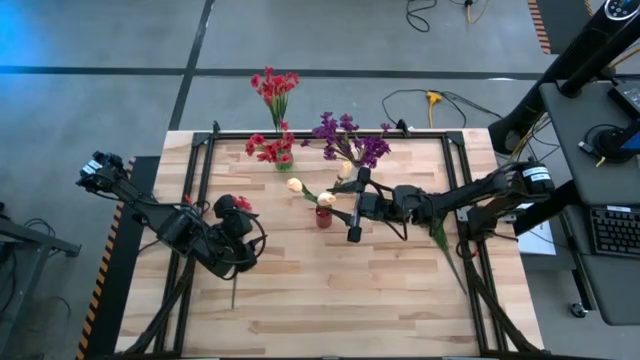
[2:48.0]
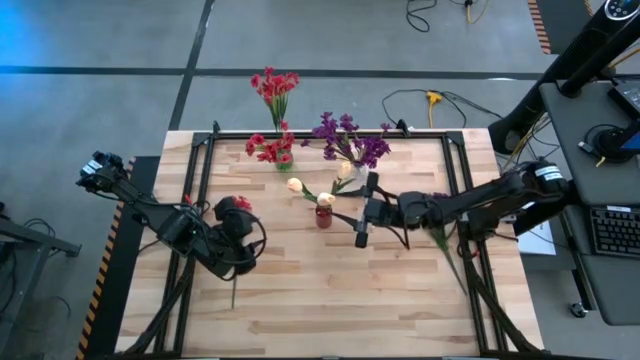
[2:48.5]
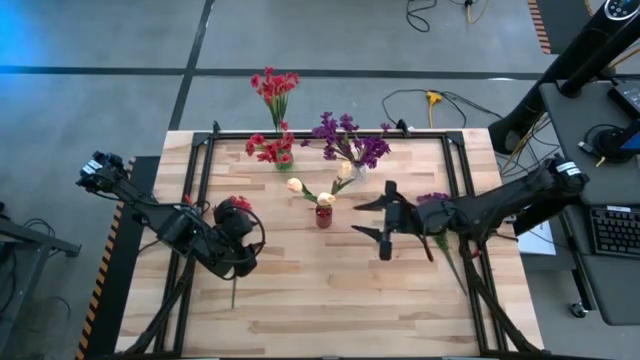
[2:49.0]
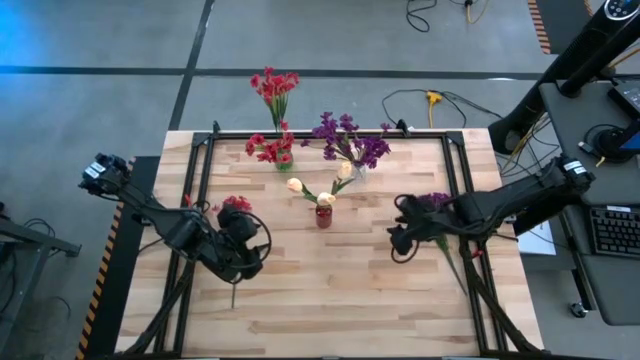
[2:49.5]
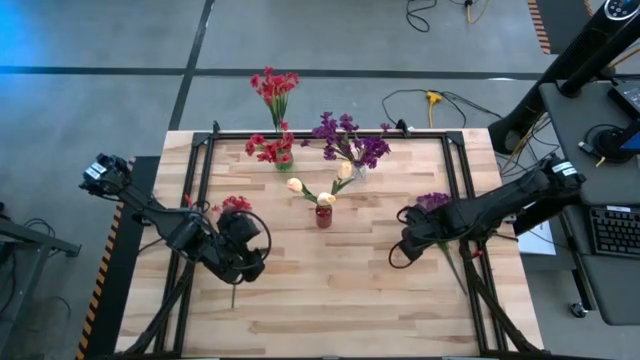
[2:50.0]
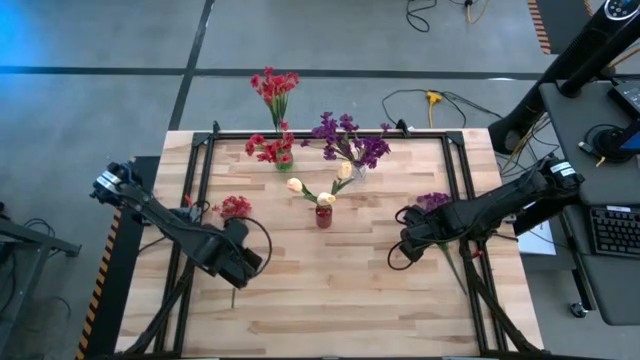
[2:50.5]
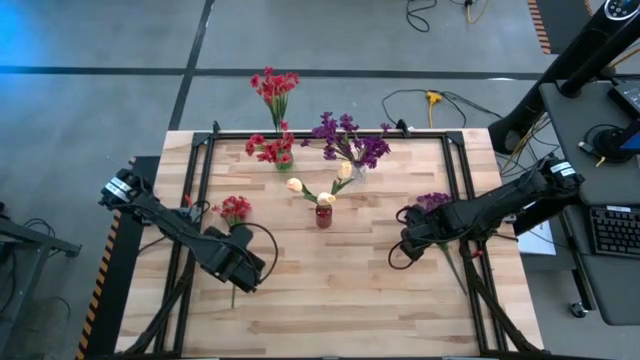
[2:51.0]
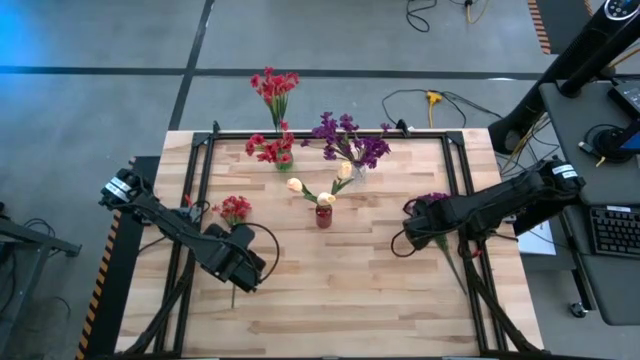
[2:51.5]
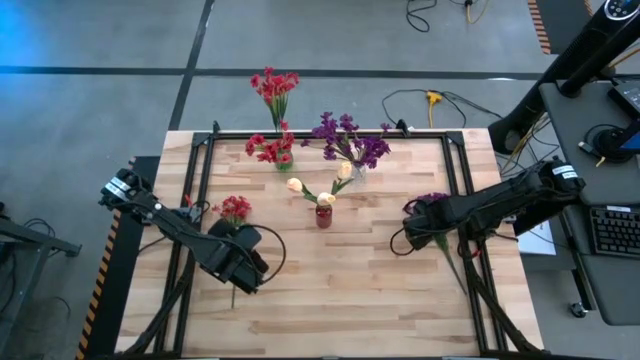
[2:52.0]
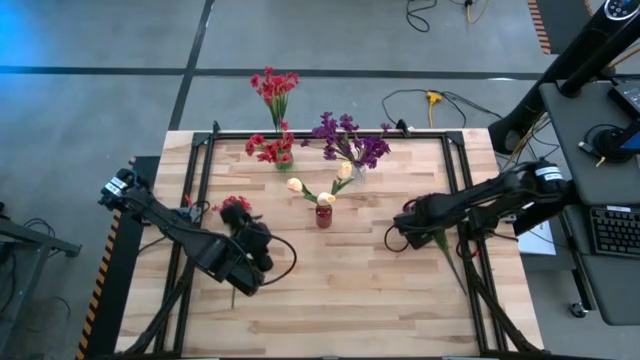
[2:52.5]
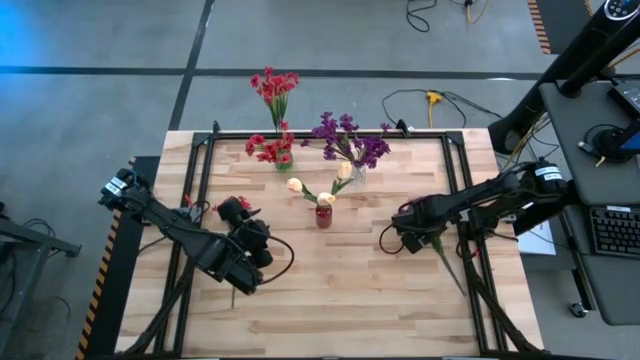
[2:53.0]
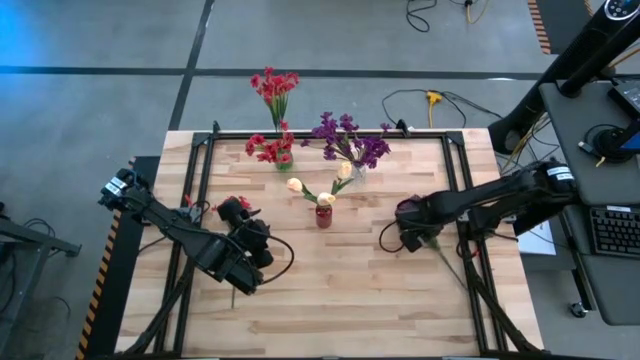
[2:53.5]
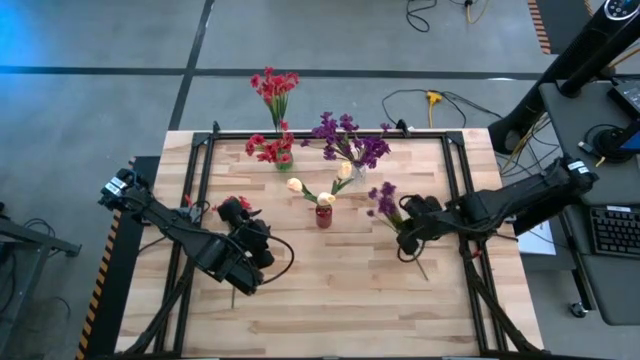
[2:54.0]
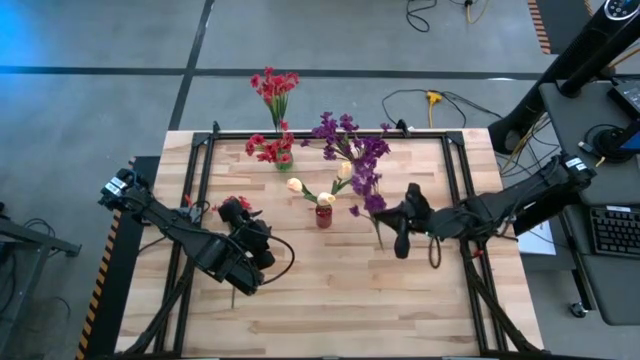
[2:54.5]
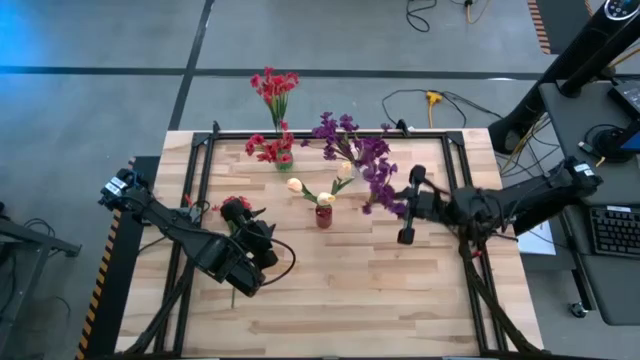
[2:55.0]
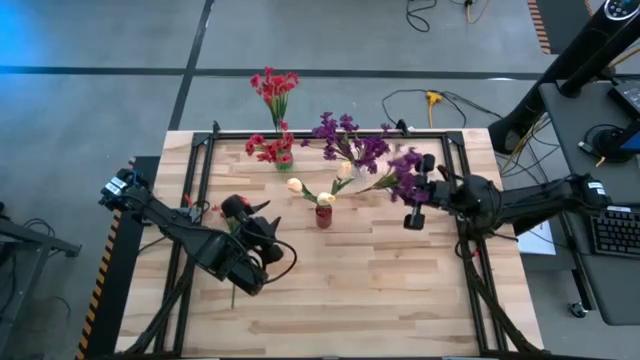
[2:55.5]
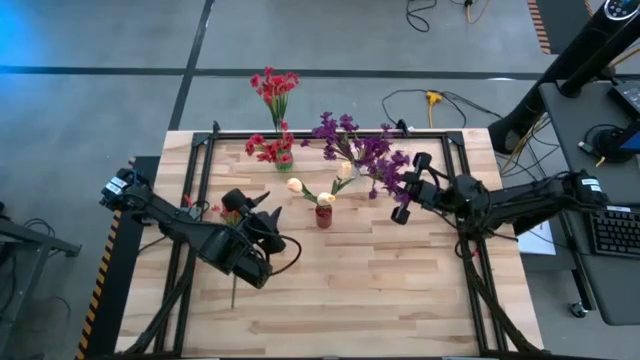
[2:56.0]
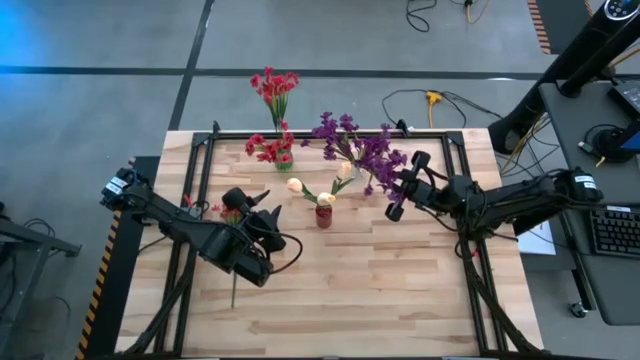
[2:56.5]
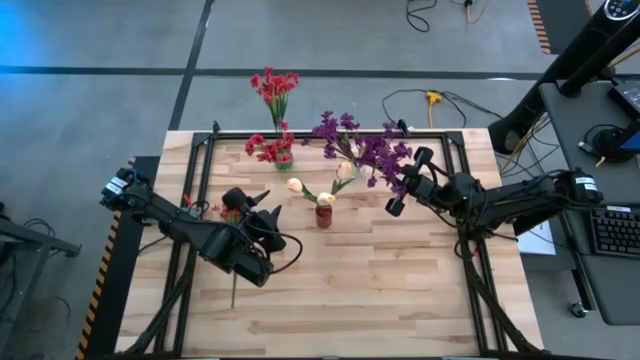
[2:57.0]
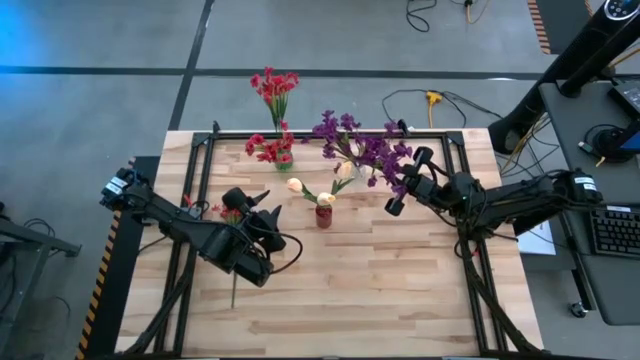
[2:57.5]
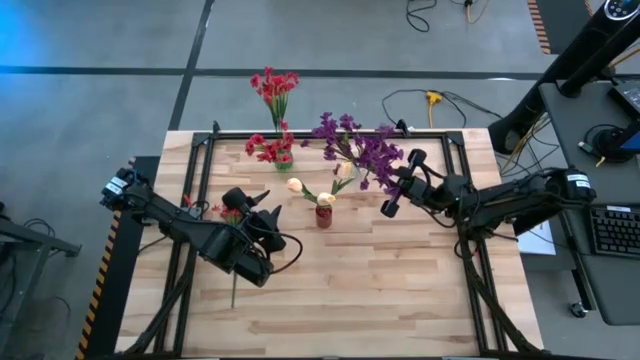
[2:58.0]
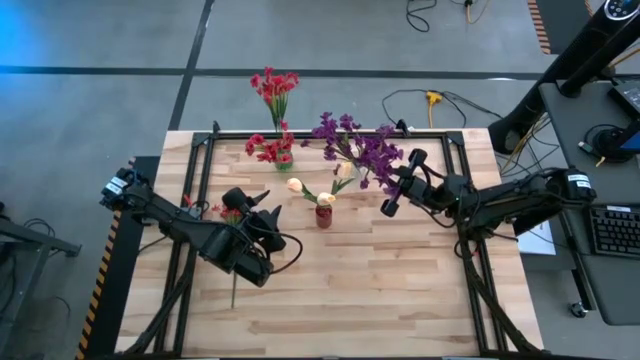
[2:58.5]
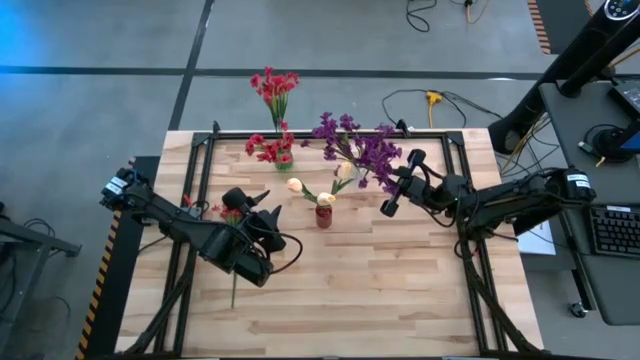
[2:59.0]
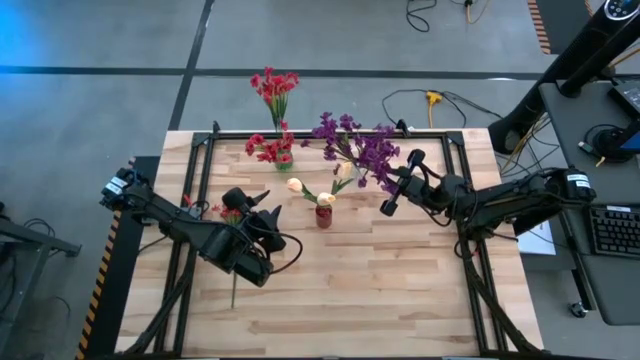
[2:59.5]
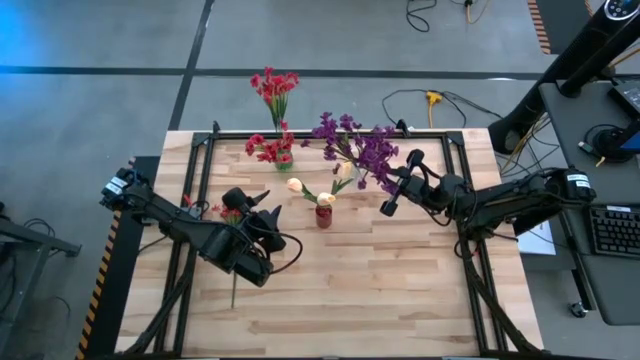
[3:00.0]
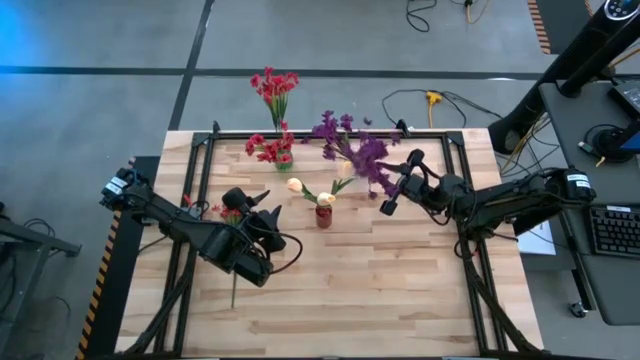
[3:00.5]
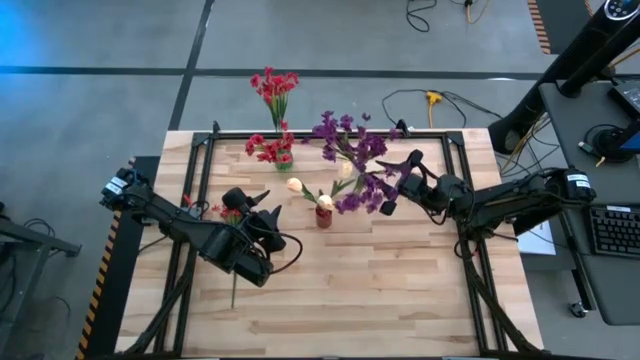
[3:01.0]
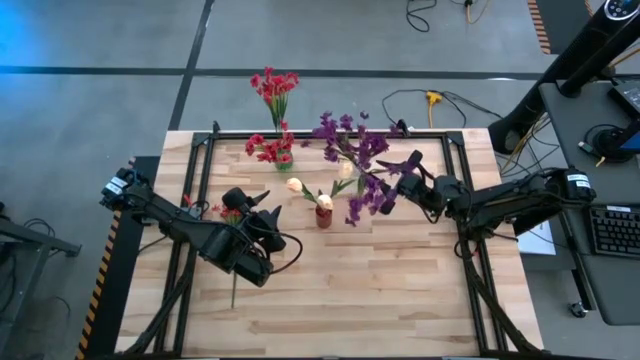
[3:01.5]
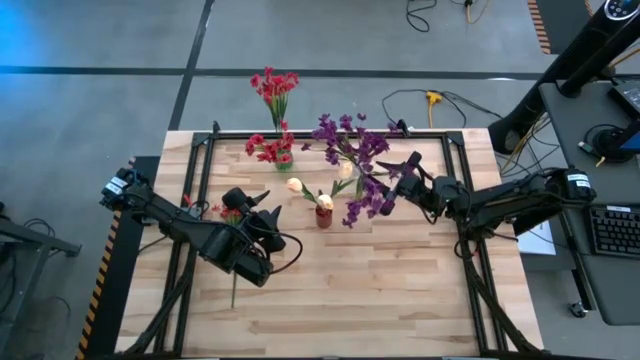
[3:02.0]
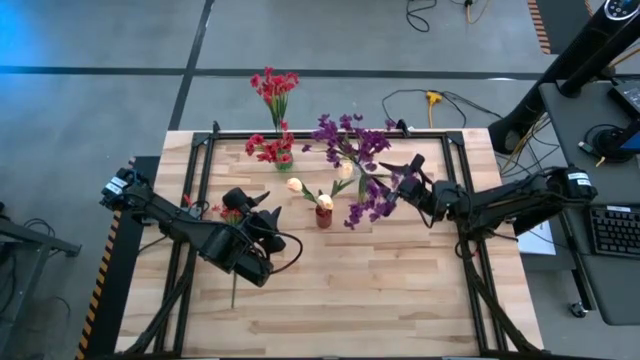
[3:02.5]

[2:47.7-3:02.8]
Task: Sort flowers into vase by color
Put the purple flowers into the transparent vase

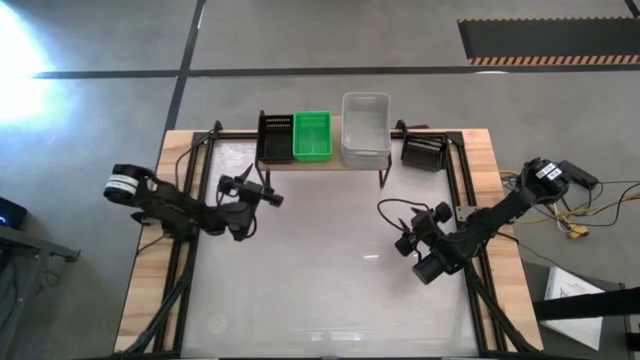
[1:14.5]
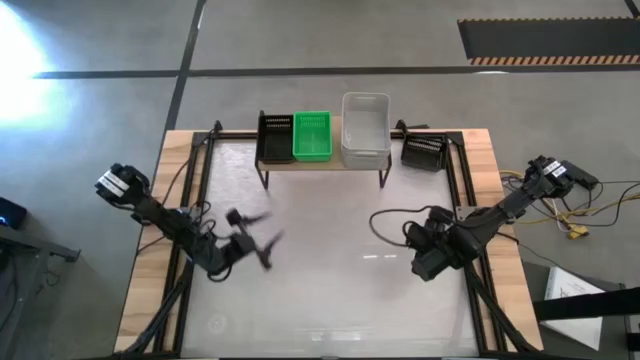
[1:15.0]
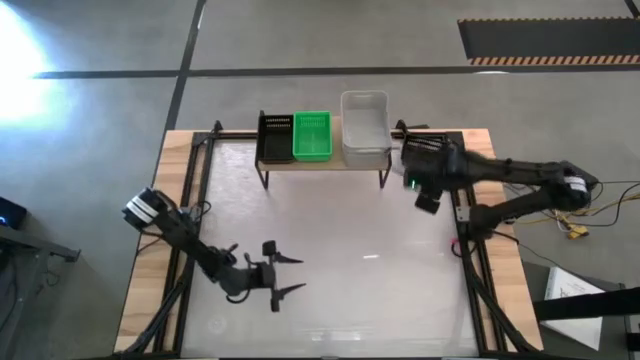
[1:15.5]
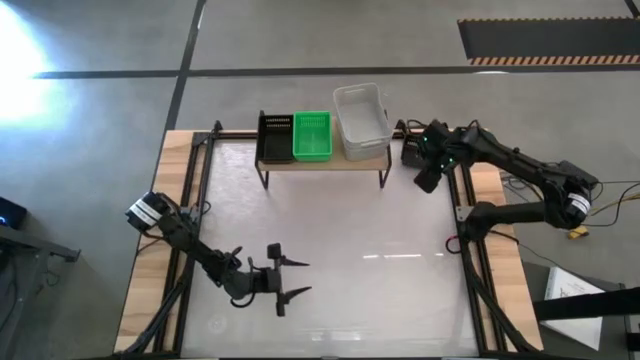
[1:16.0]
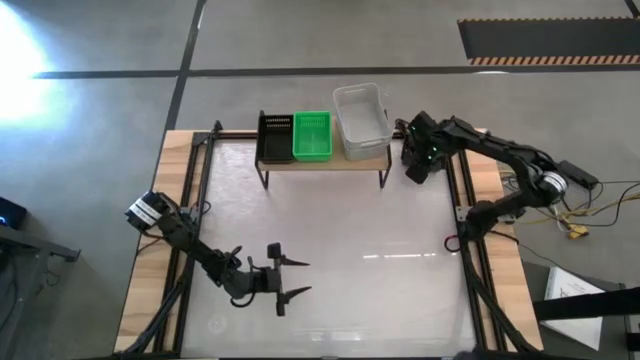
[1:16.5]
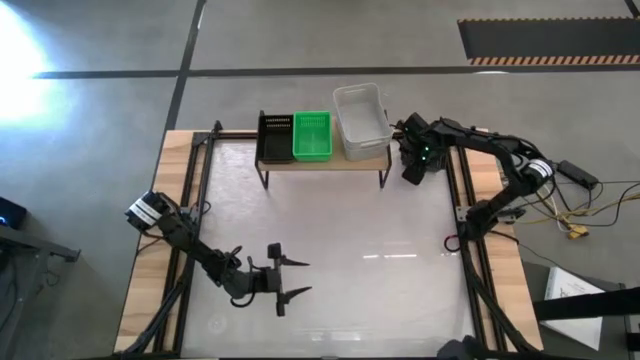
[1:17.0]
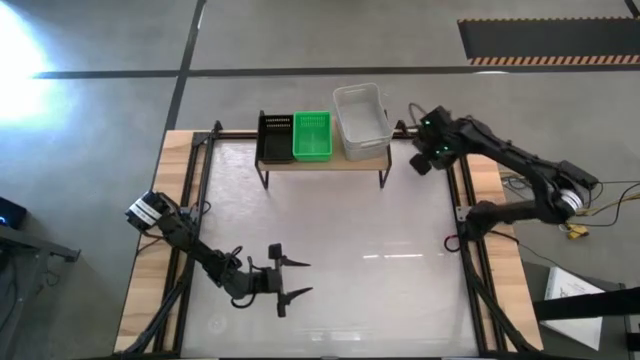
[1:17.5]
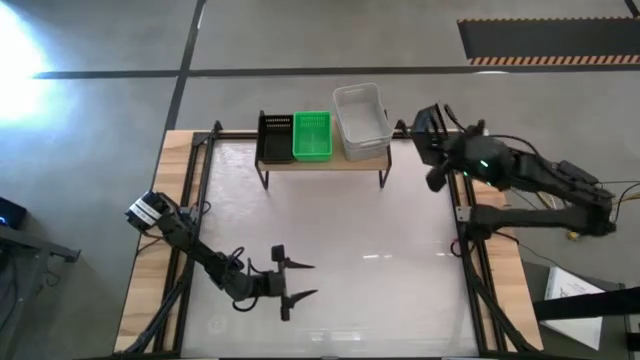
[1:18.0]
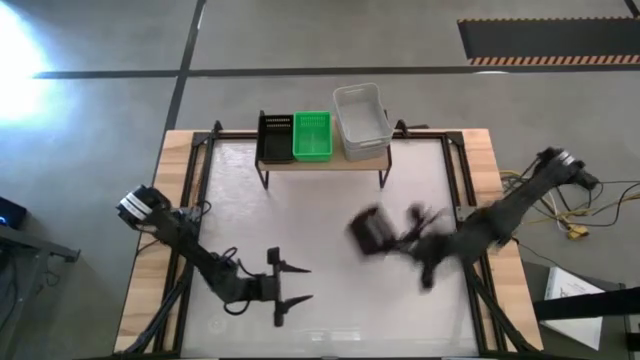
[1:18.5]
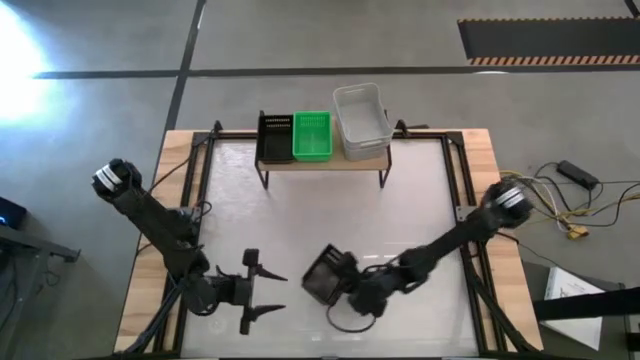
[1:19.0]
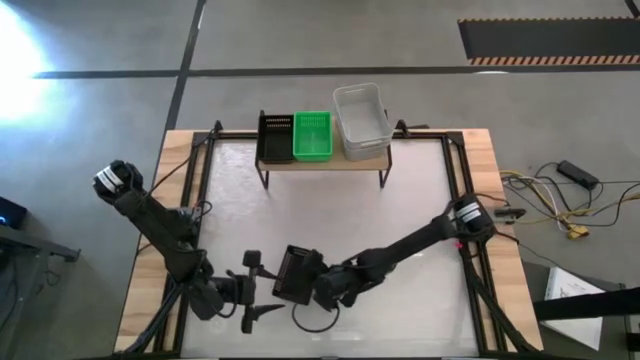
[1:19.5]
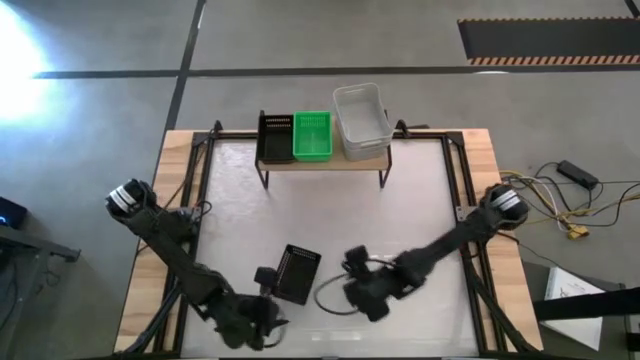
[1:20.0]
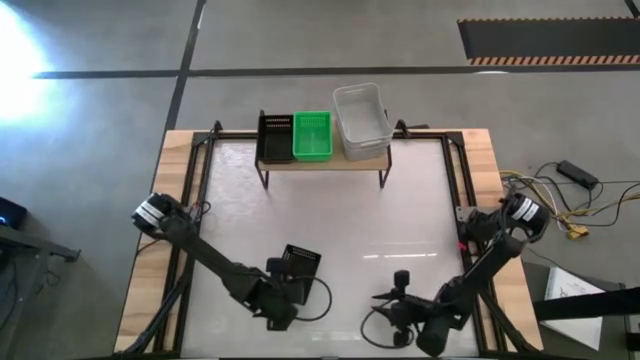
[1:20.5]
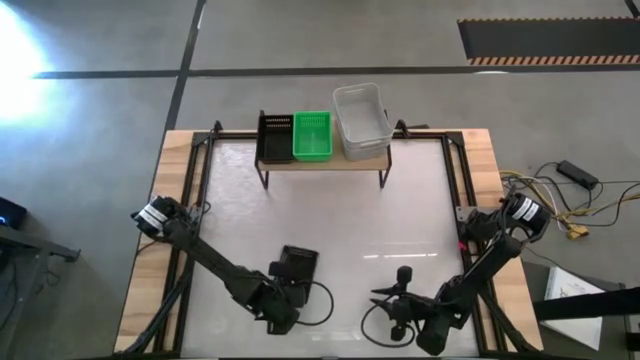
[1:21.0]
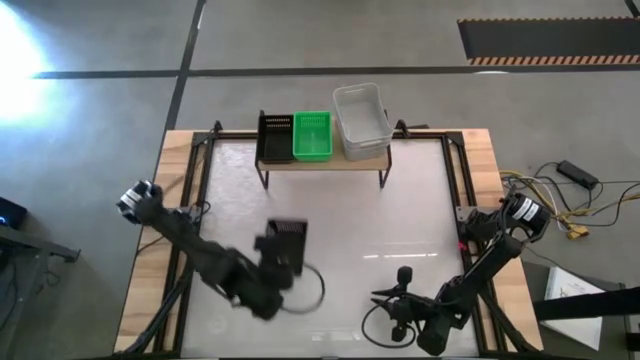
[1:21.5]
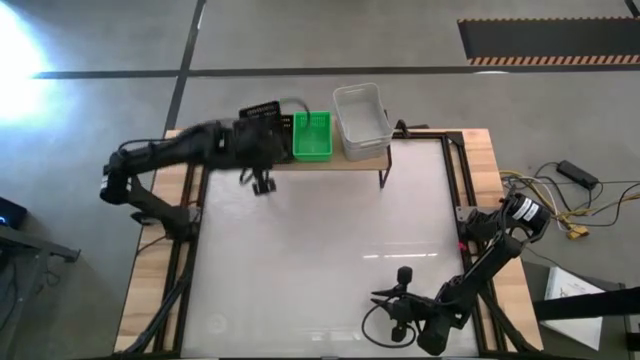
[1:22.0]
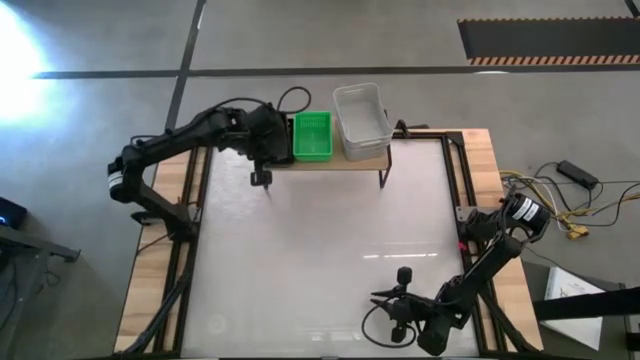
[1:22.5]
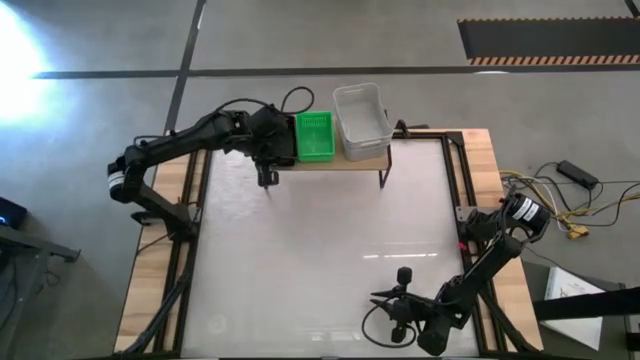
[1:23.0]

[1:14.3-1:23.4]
Task: Stack baskets on shelf by color
Stack the black bin on top of the black bin on the shelf
